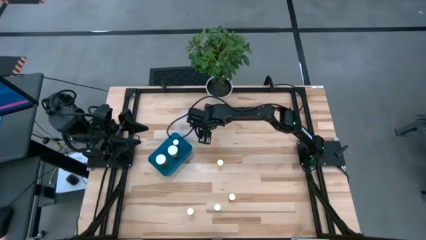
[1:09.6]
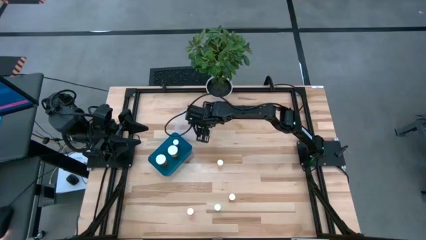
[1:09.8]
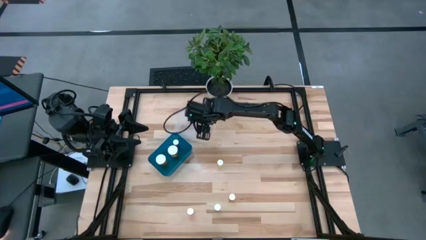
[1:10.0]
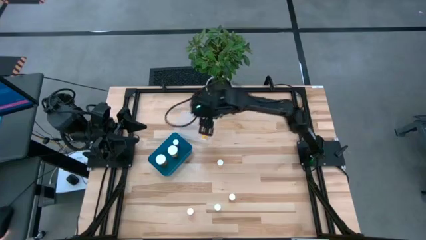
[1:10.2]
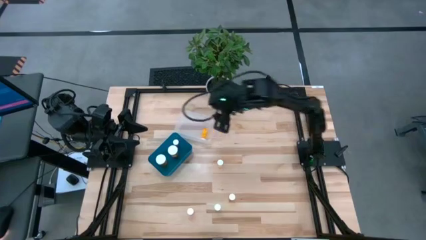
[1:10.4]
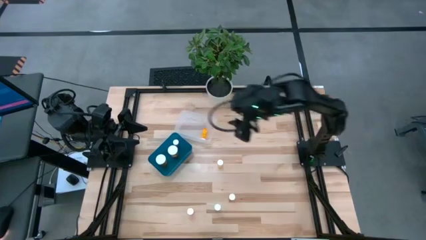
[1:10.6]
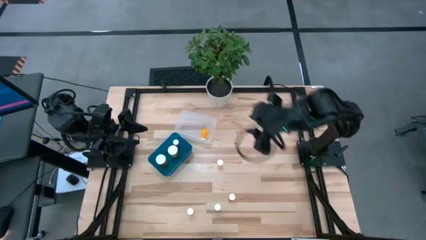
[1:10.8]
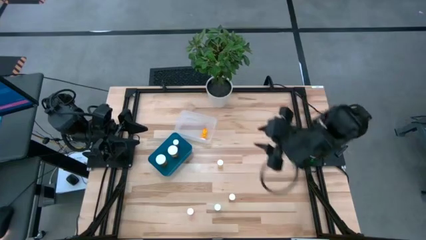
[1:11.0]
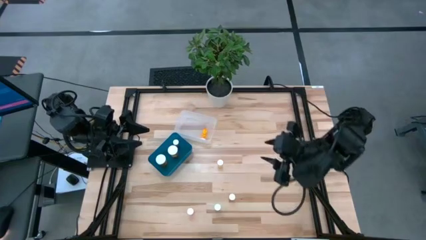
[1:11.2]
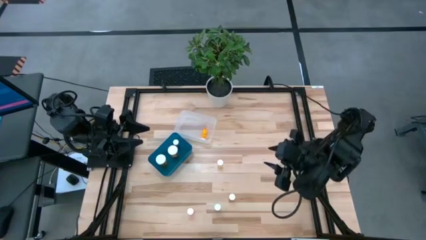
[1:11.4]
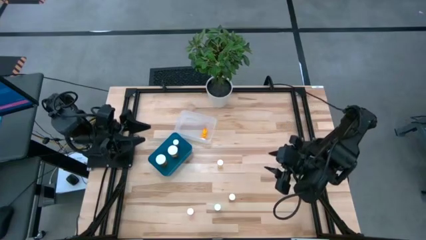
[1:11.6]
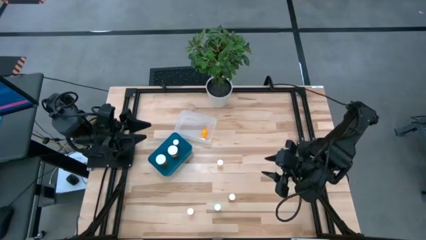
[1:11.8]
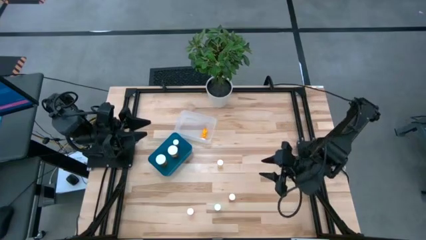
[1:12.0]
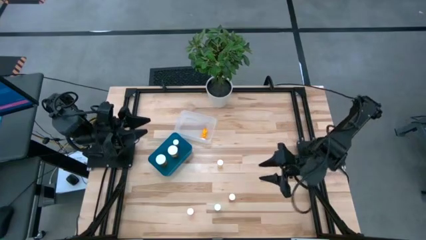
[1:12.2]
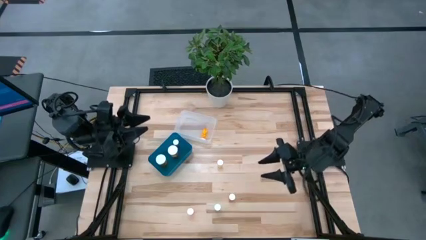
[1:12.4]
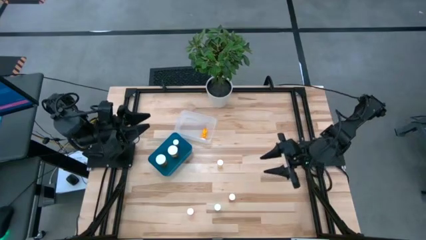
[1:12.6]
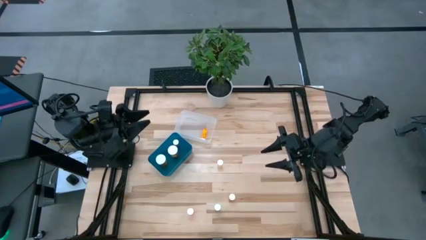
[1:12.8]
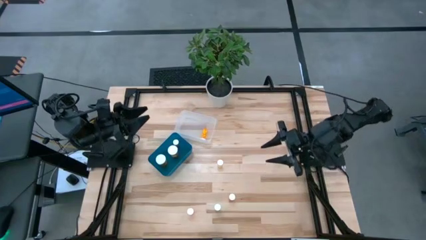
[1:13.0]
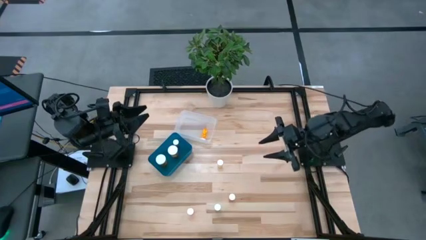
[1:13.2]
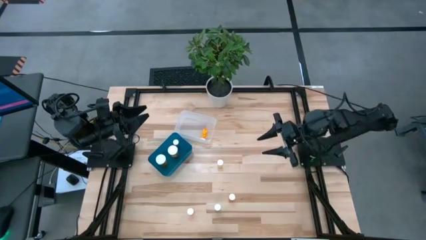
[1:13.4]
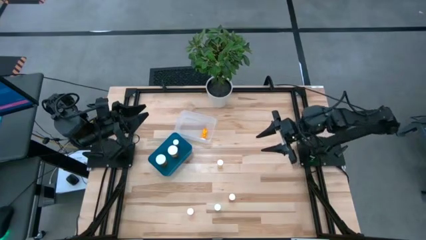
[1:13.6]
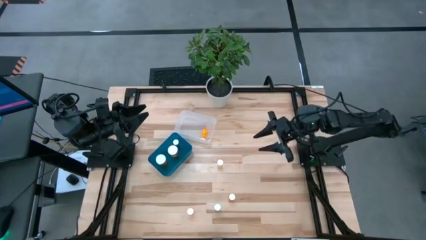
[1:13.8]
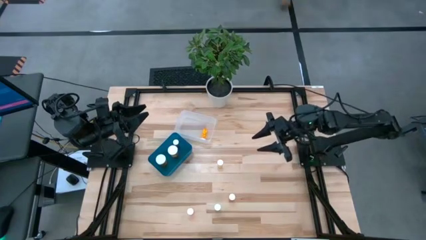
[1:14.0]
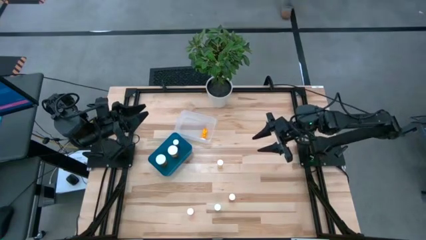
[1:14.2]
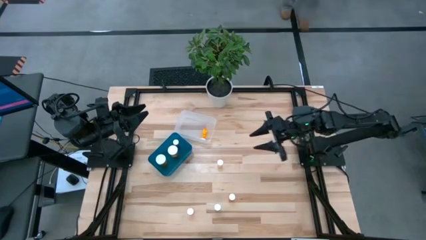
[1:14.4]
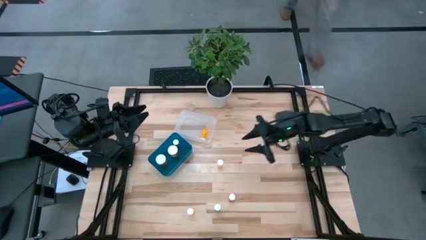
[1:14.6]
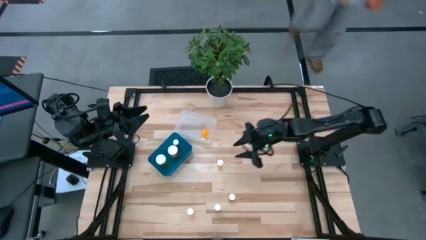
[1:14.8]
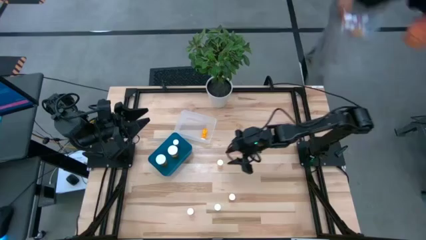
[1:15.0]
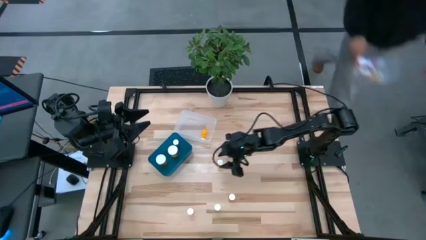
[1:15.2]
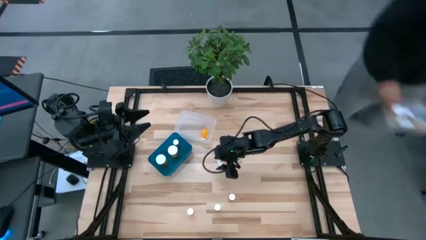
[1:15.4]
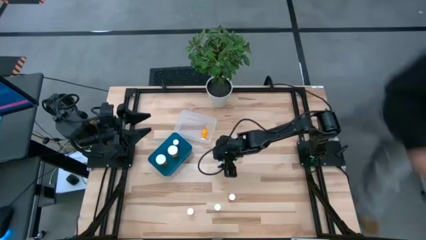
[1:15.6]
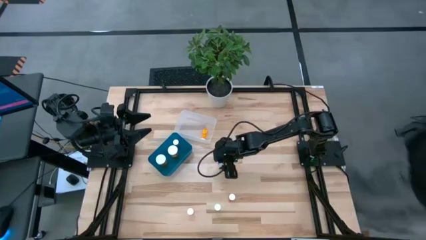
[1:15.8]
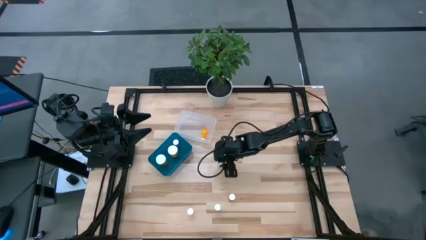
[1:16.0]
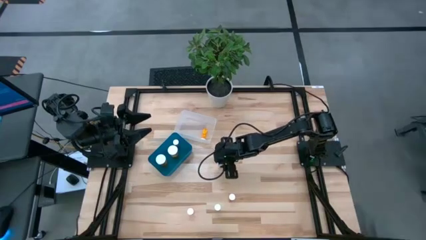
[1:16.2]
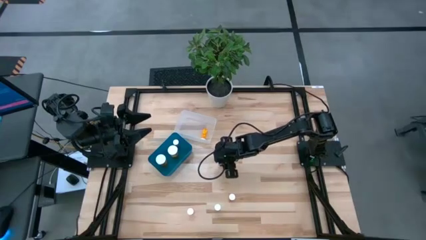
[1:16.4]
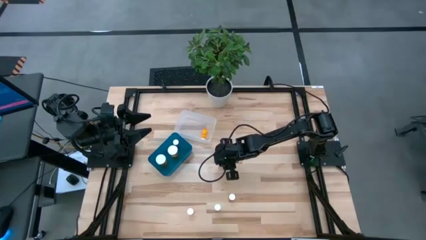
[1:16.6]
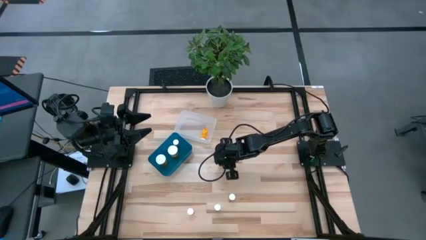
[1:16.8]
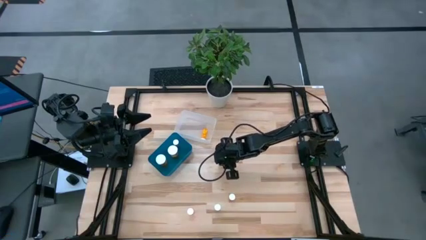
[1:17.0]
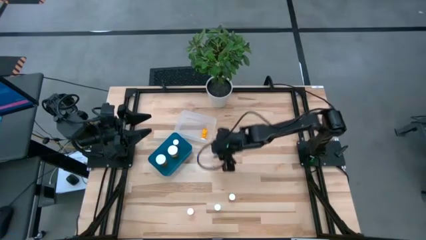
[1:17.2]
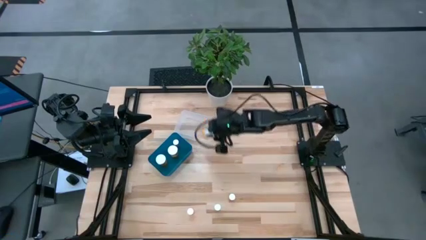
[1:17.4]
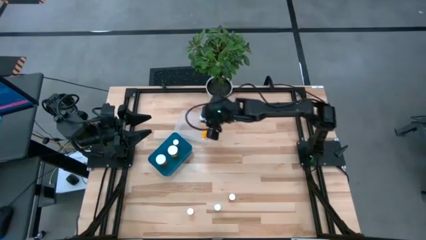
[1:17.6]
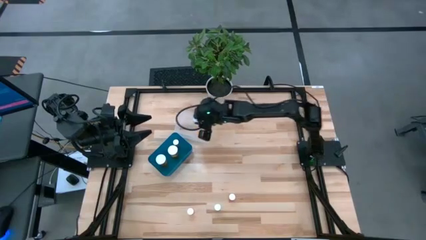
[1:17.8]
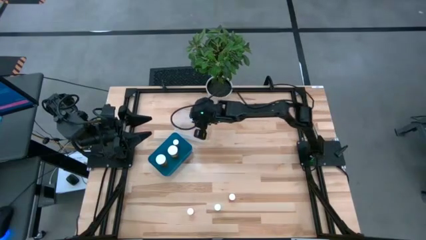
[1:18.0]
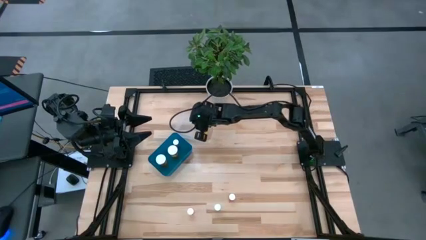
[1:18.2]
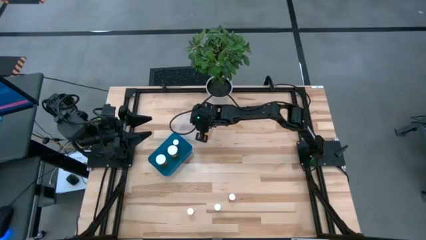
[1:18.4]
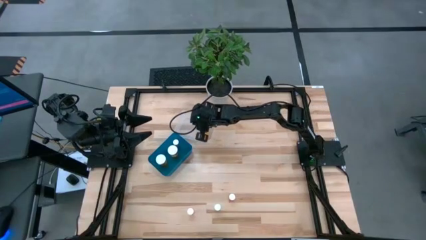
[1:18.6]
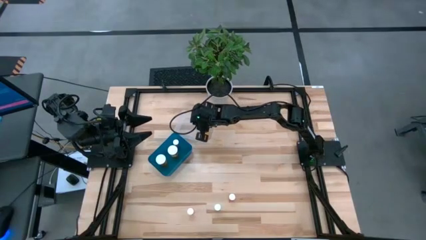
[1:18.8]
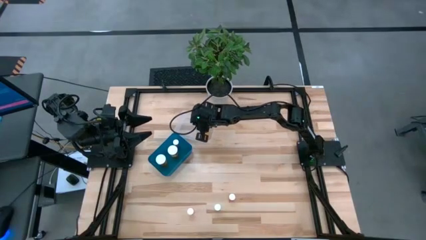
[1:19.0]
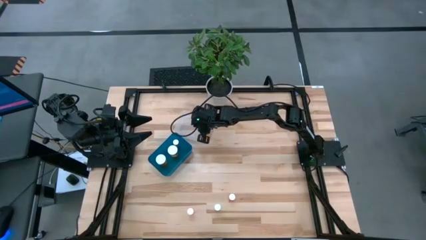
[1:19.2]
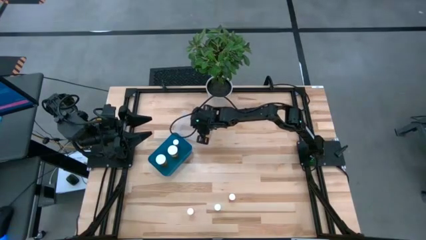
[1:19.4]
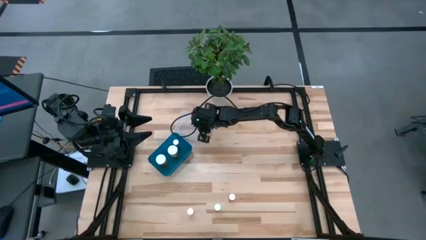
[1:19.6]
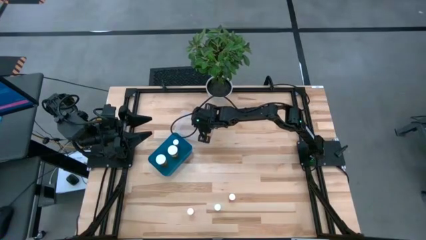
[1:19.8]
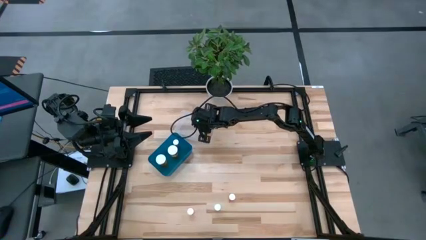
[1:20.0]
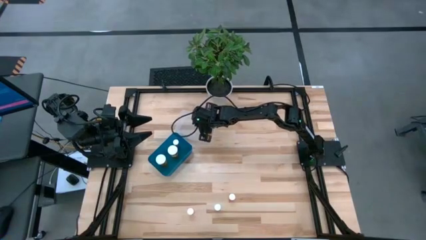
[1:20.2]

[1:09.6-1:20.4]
Task: Pick and place medicine bottles into bin by pill shape (circle, oval)
Put the orange pill bottle into the transparent bin

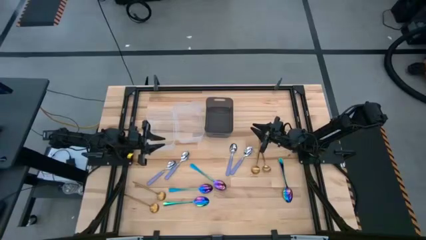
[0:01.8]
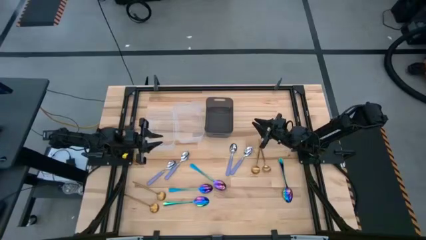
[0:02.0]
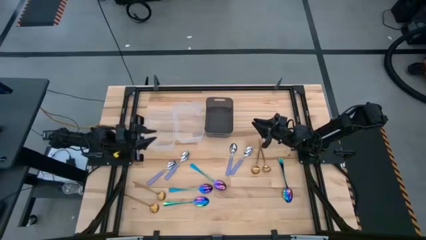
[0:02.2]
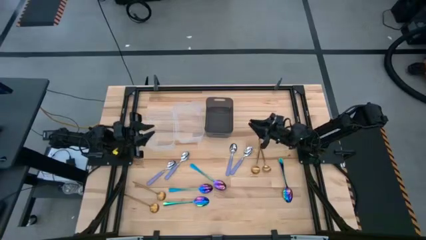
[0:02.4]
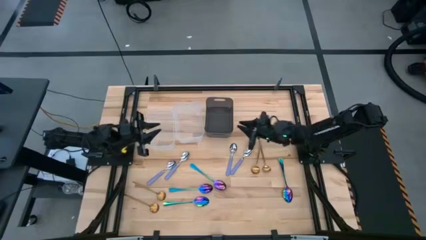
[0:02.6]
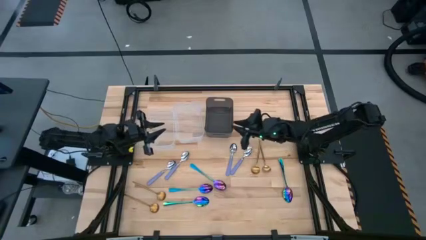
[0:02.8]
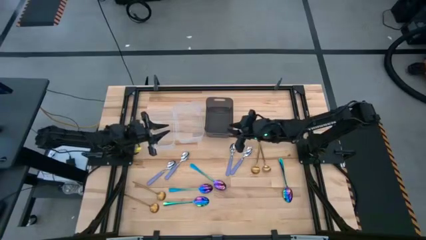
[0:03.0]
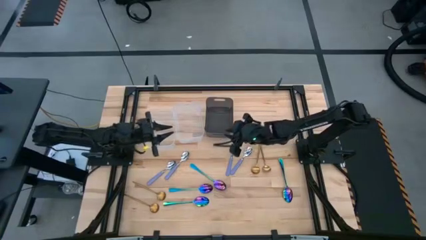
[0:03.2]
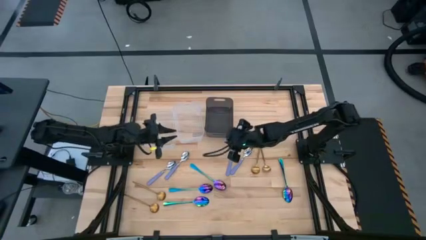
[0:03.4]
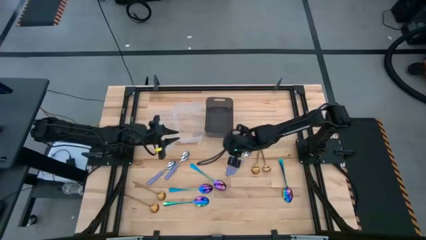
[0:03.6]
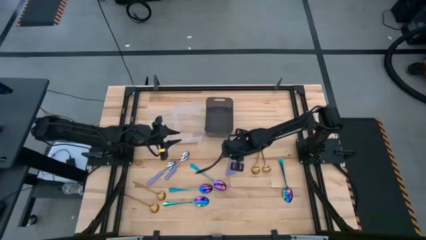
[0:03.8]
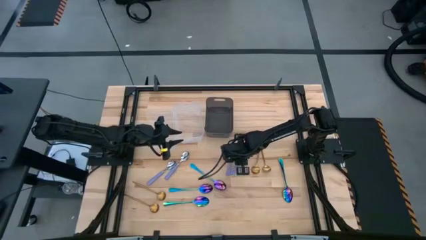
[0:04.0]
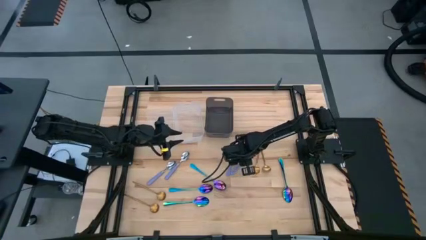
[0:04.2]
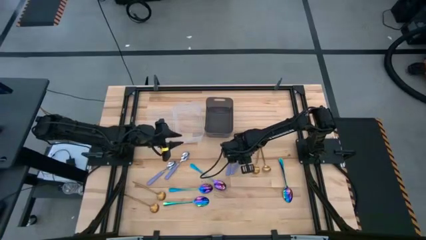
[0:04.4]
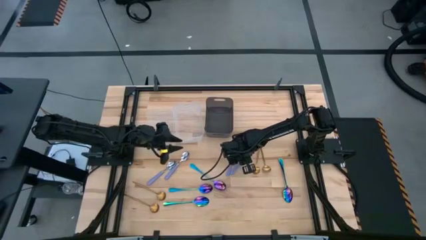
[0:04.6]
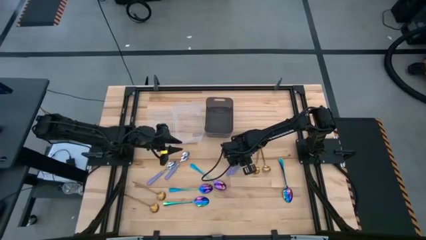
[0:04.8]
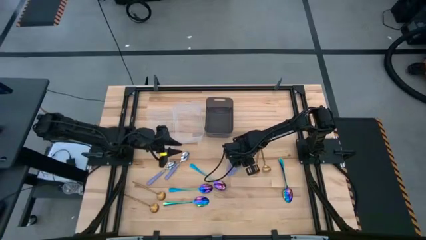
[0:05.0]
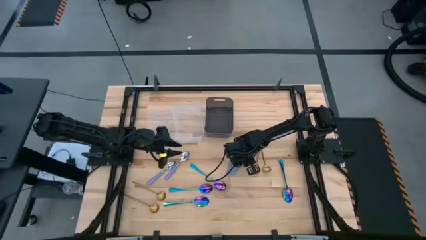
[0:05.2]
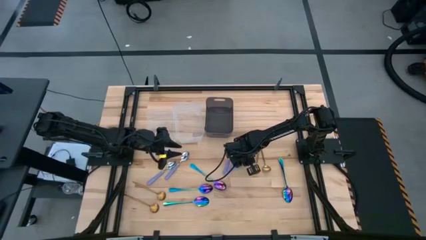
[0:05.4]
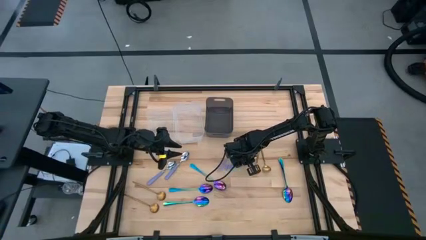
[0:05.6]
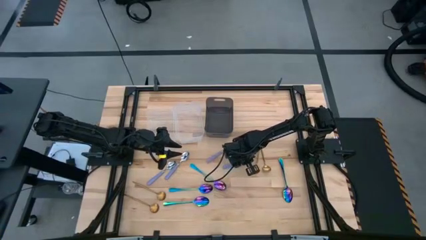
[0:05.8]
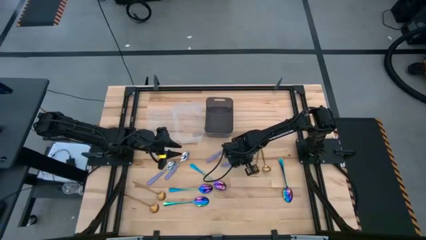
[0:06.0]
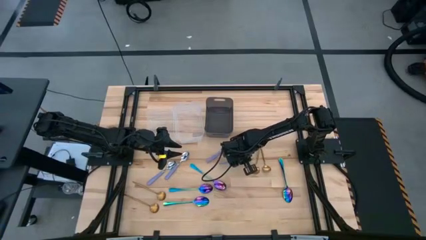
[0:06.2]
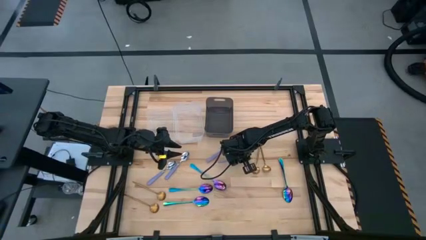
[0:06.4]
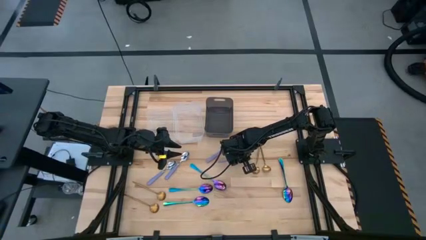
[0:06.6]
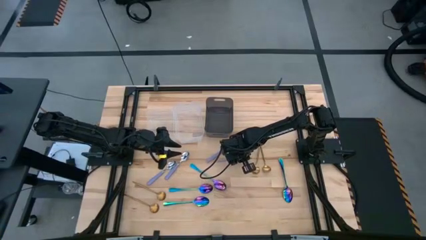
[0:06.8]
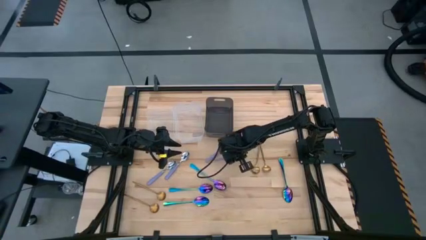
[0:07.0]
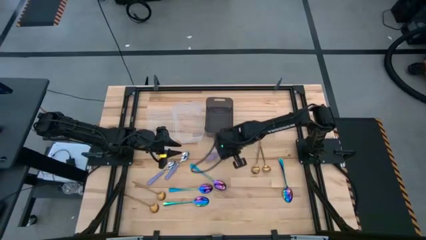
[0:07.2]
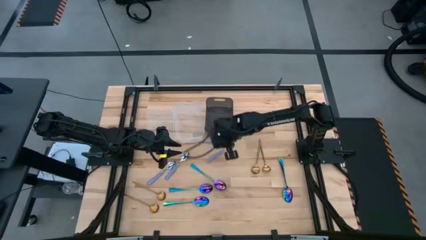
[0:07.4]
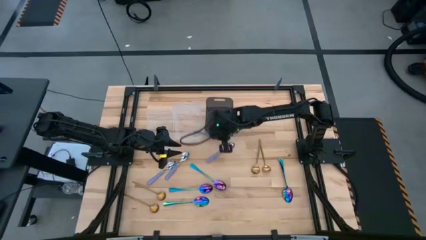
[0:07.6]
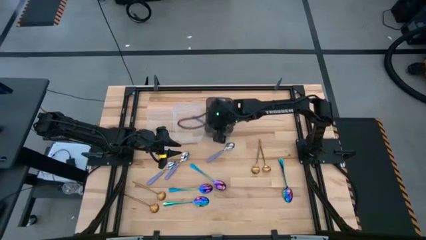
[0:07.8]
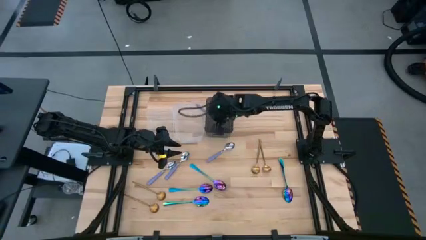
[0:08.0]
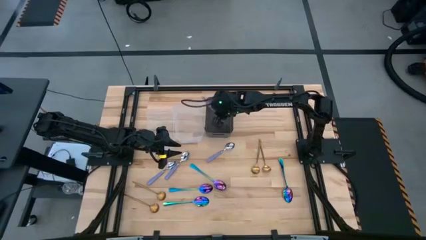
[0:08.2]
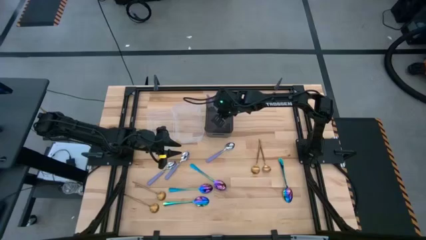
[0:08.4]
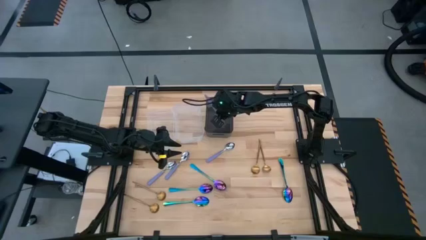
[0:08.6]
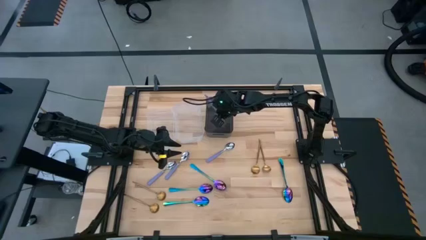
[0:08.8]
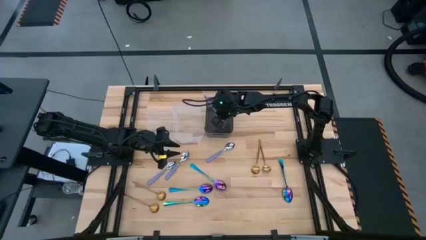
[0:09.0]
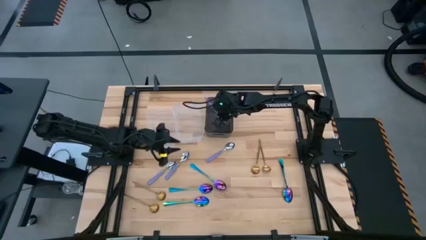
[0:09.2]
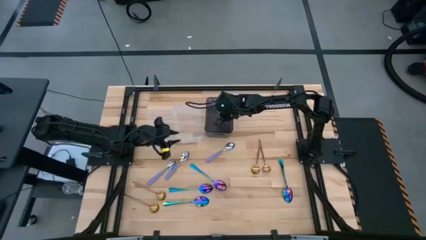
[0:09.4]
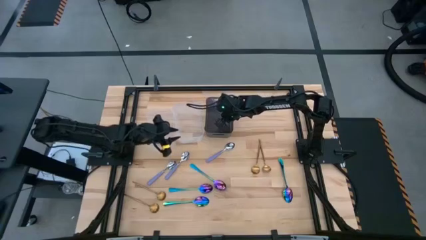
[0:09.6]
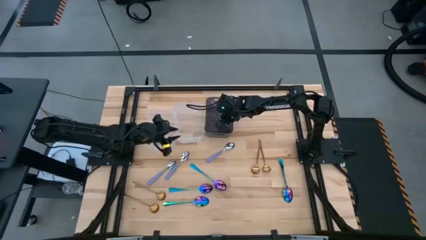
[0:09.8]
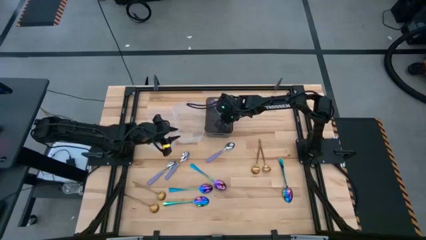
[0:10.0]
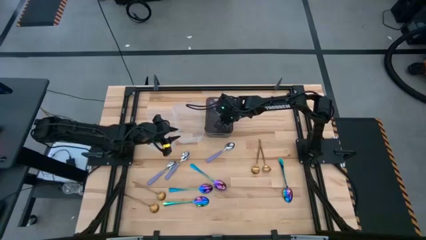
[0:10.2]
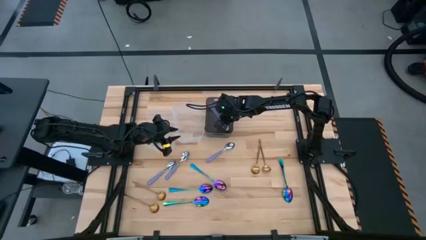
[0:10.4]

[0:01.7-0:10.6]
Task: Sort silverware by color (type)
Put the purple spoon into the black transparent bin
